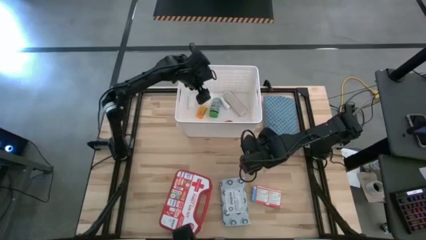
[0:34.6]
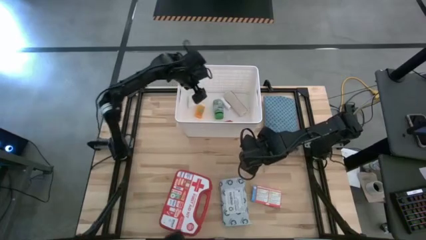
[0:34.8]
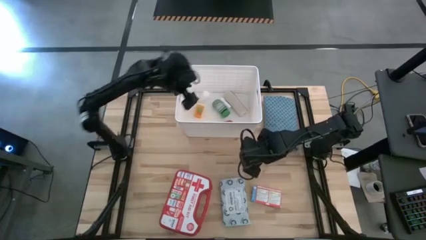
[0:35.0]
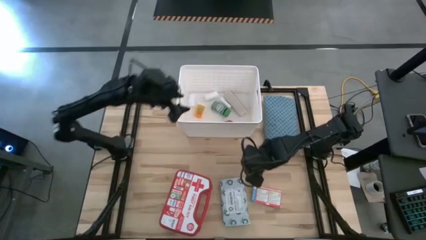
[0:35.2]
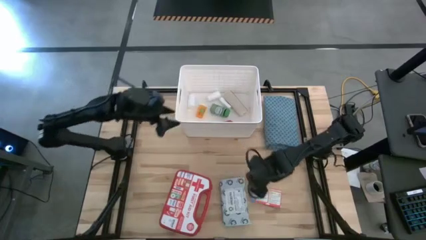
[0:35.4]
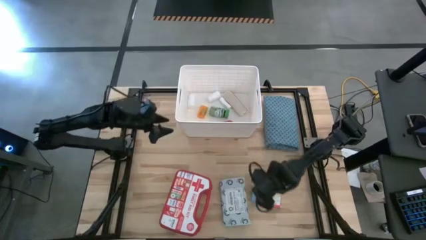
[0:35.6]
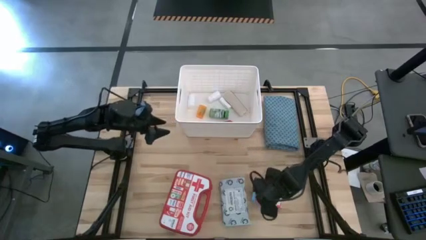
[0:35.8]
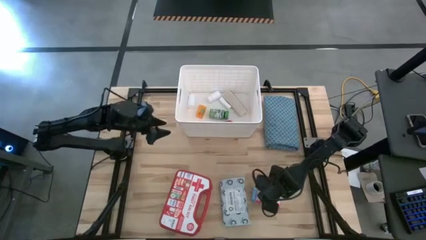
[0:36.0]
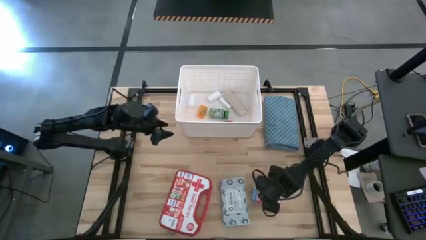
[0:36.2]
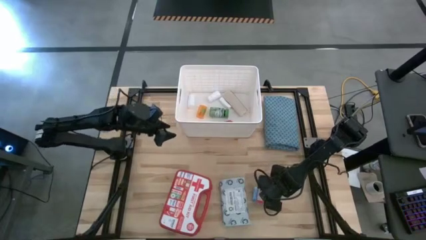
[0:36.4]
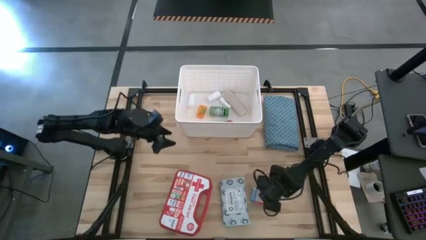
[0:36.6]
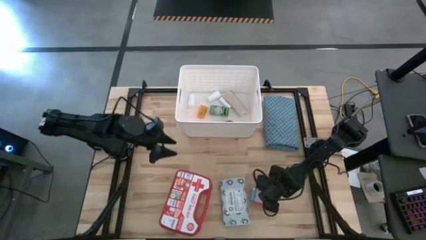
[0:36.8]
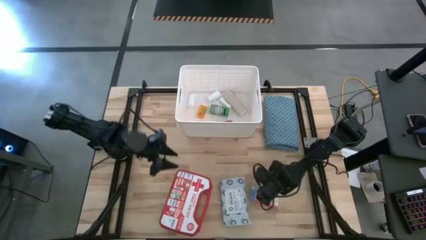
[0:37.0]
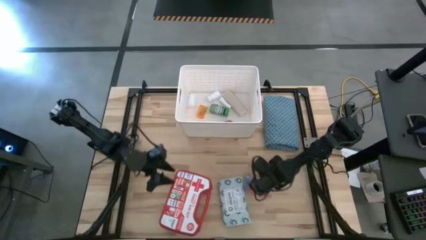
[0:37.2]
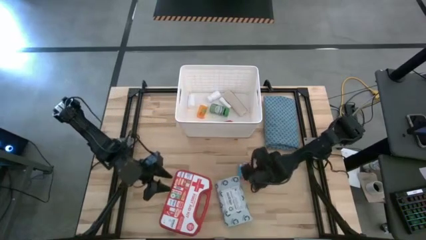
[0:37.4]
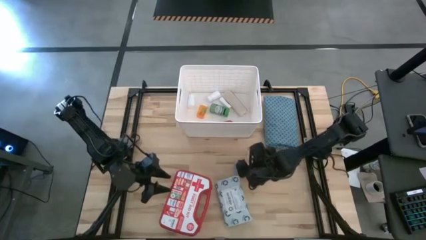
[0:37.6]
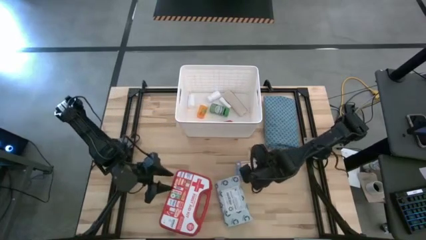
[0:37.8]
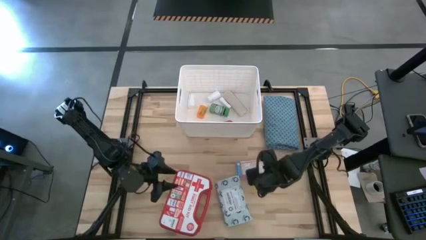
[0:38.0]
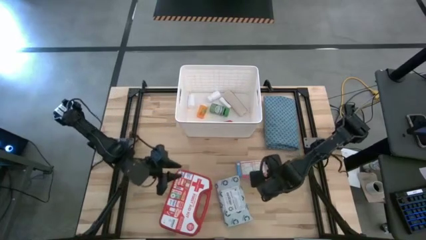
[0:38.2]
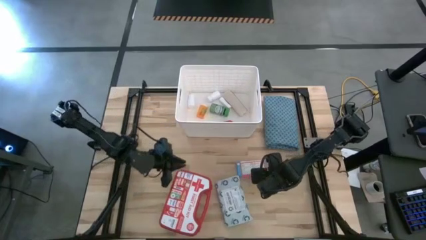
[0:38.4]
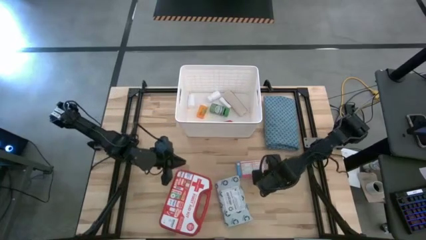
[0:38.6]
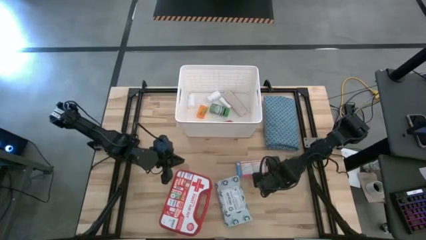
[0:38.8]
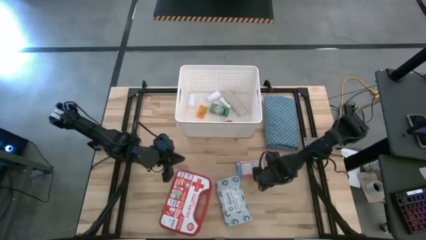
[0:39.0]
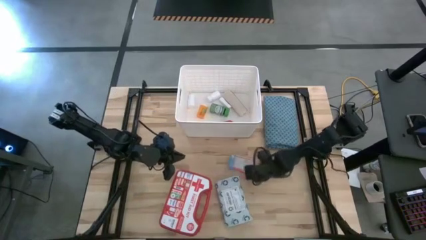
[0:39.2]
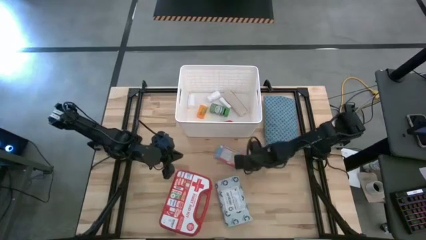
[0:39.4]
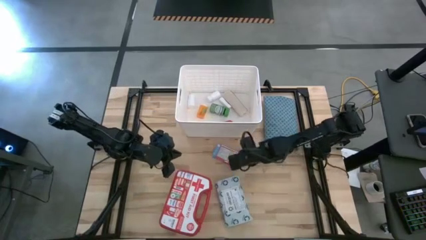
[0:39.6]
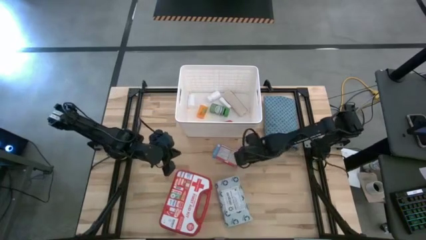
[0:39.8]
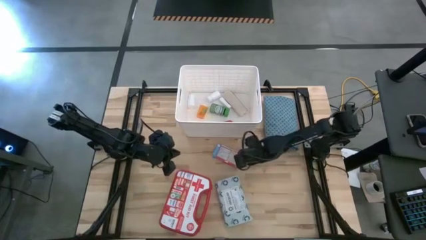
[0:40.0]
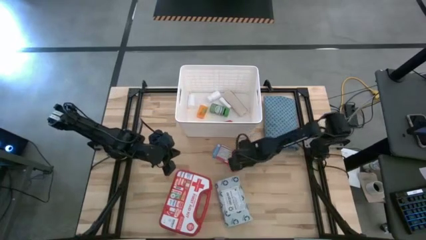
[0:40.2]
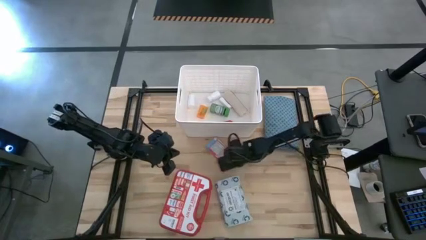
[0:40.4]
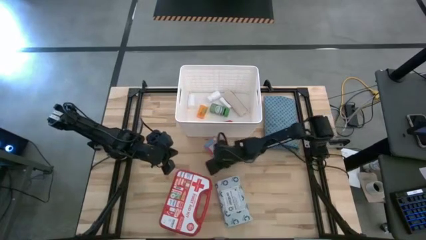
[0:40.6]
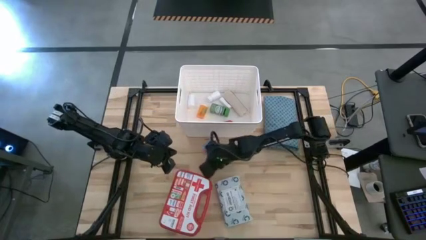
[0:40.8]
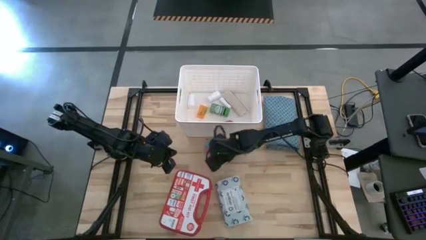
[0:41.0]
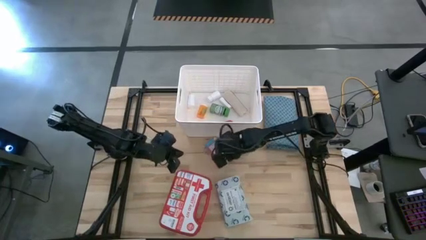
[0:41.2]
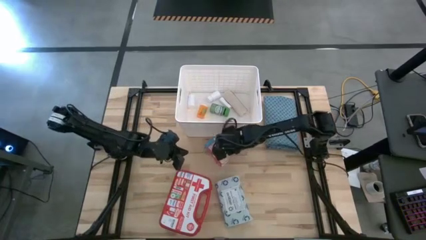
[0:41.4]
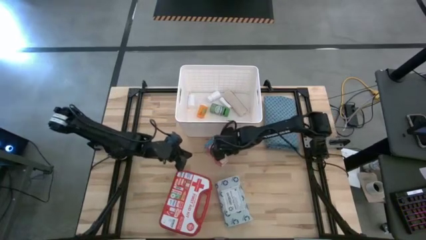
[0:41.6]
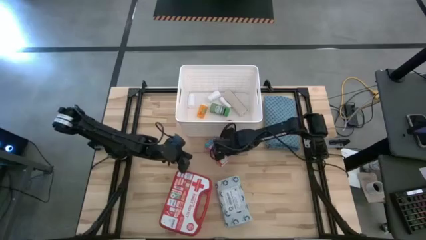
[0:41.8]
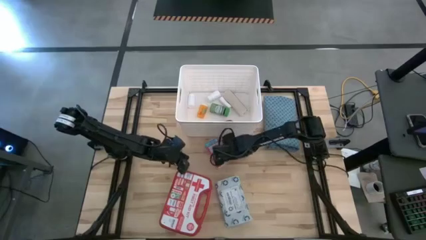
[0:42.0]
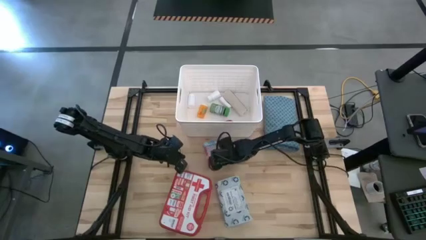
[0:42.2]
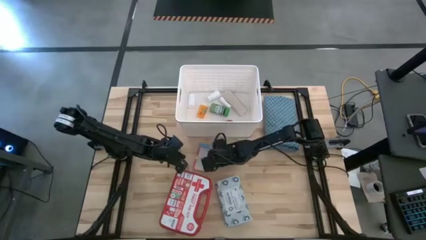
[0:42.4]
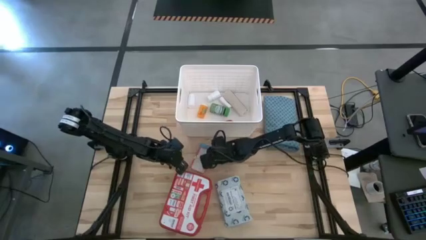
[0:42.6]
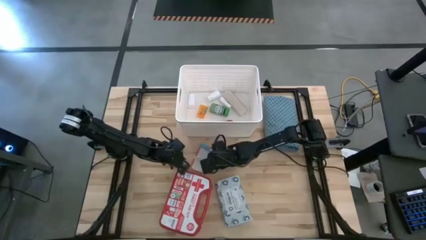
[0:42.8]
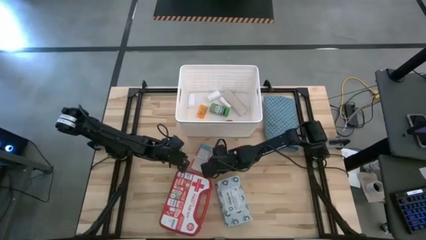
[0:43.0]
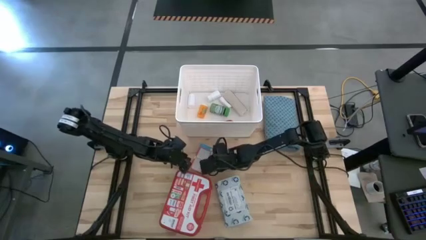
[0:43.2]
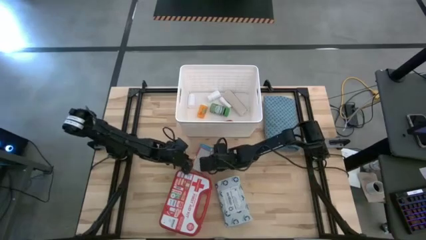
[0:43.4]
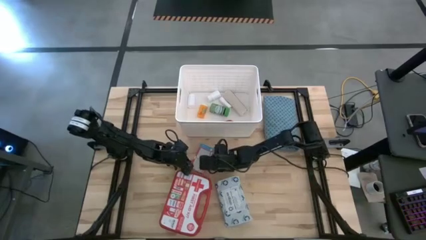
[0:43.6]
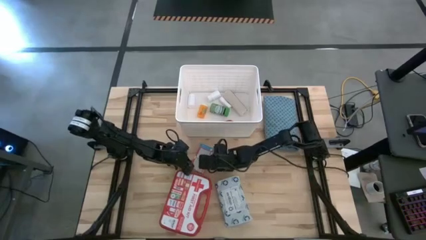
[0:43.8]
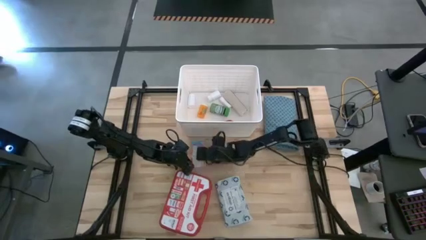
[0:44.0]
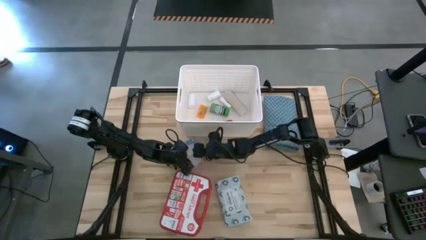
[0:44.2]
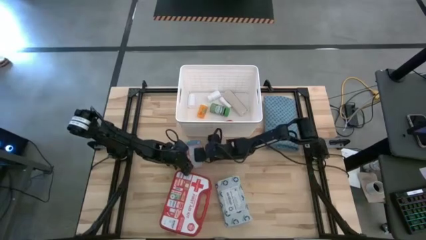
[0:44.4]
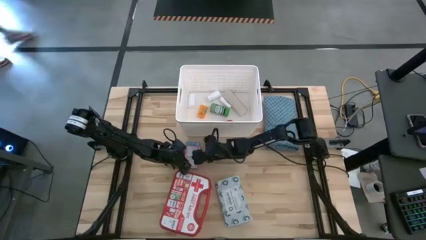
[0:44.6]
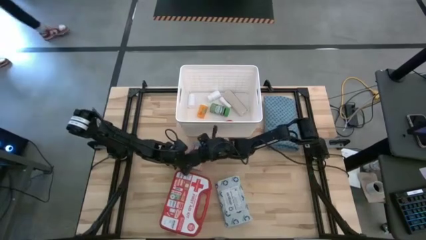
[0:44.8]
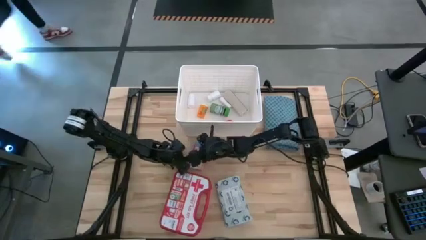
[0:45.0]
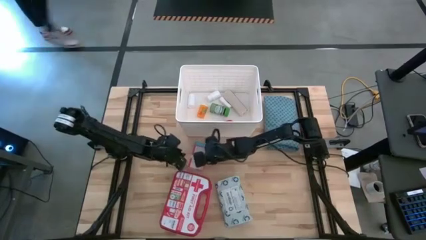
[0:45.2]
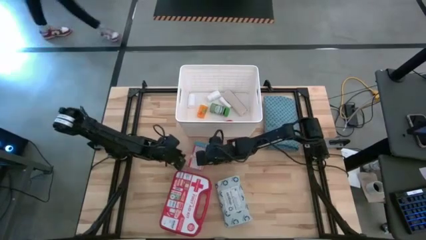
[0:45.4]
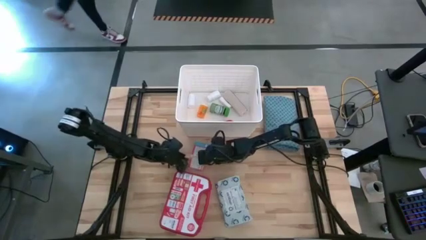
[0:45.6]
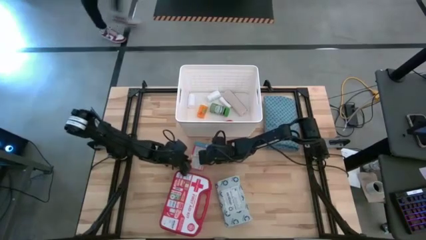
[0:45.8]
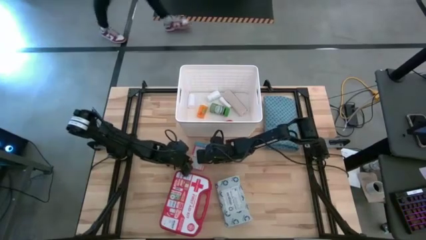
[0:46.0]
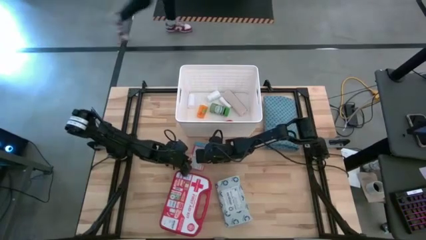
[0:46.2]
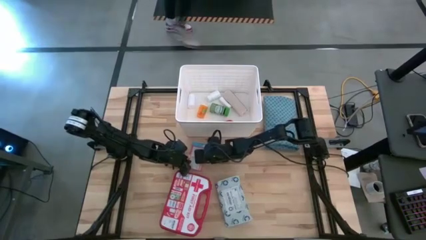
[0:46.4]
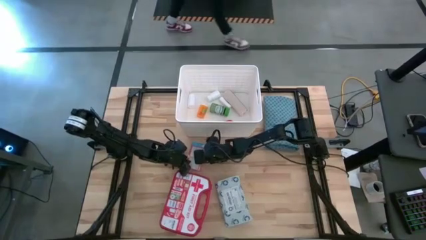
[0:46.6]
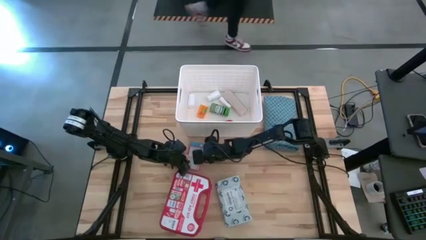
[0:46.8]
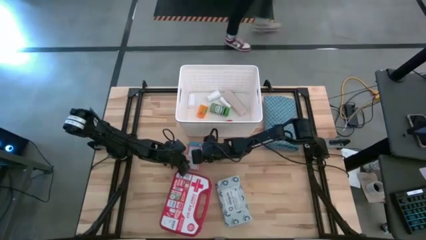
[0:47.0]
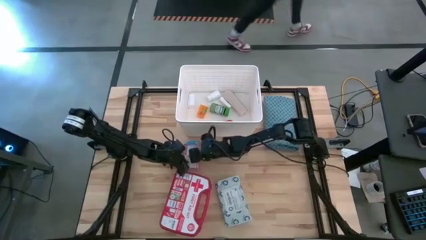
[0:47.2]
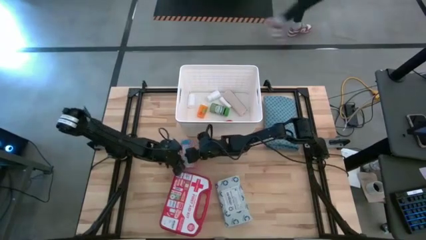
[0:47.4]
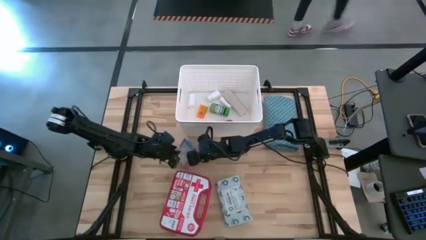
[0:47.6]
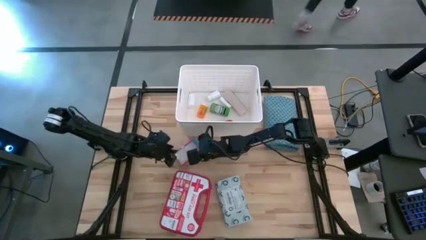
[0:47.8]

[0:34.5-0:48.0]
Task: Pick & place medical supplies in basket/bin
Put the bandage box into the white bin

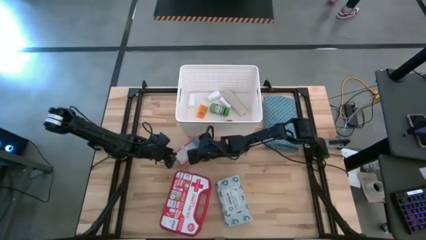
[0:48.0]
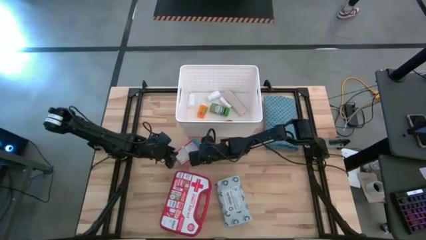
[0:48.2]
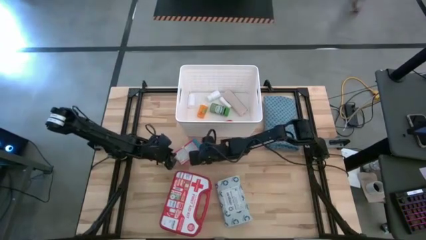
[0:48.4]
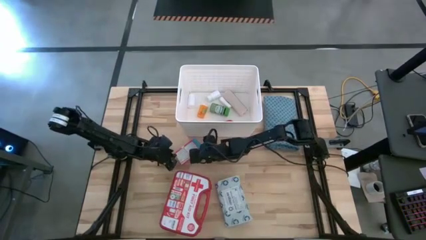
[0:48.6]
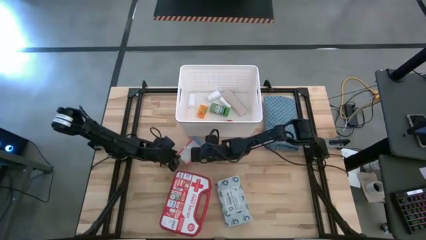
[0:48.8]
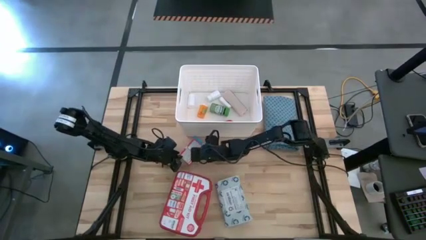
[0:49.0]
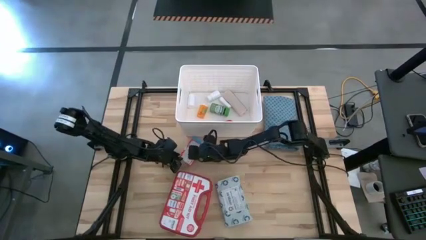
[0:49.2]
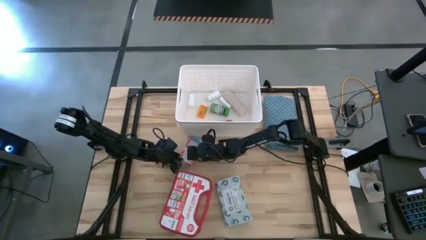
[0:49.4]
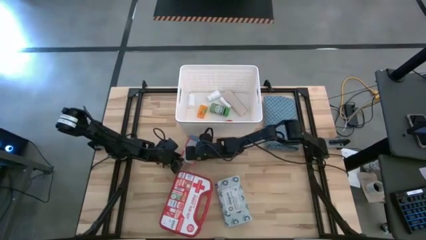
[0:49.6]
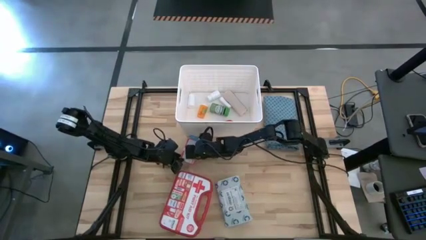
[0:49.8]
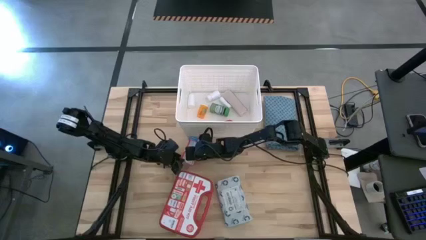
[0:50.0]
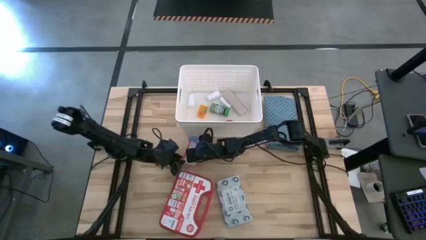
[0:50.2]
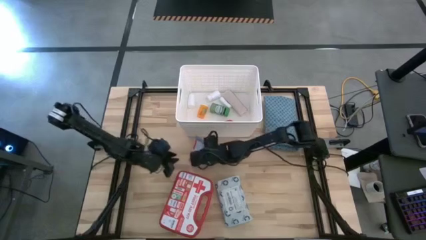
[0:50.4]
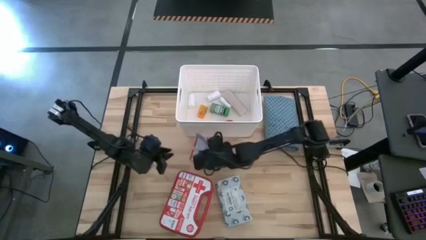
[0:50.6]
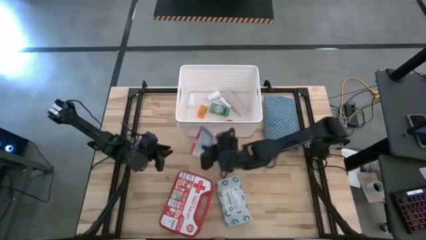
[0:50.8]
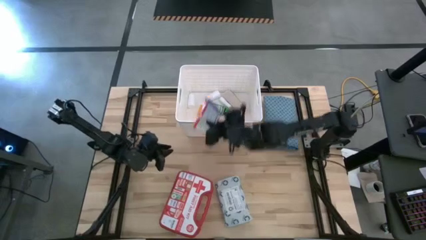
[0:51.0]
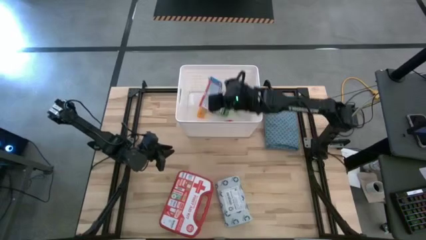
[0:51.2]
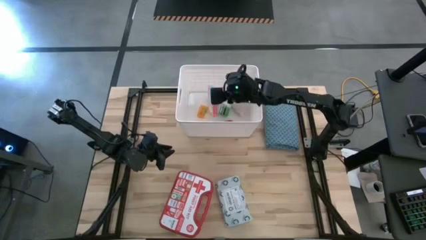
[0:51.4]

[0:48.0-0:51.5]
Put the bandage box into the white bin
